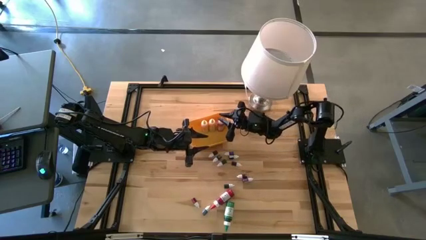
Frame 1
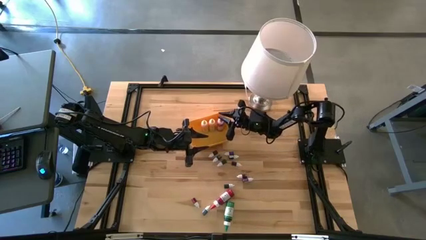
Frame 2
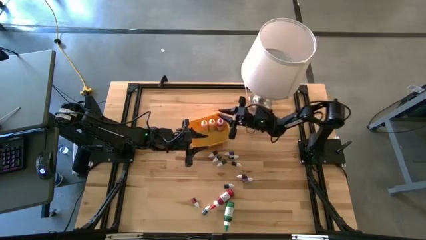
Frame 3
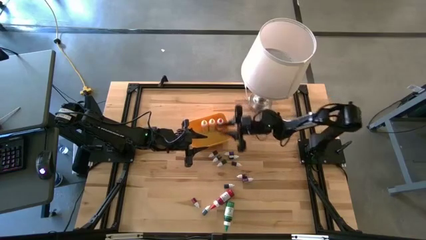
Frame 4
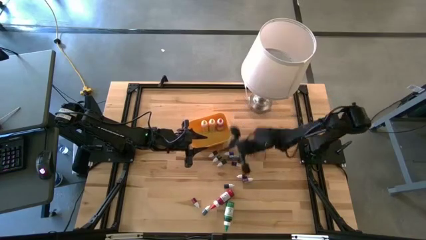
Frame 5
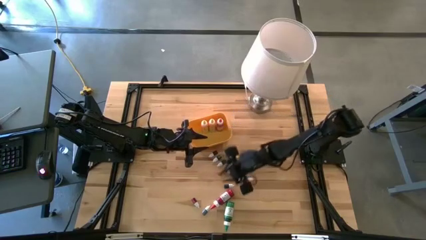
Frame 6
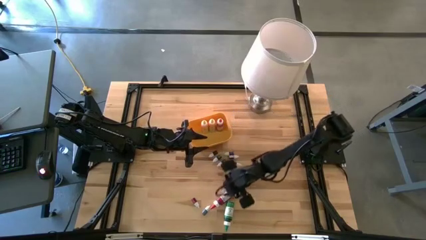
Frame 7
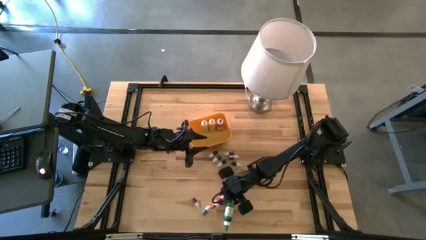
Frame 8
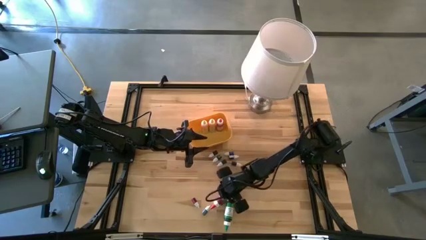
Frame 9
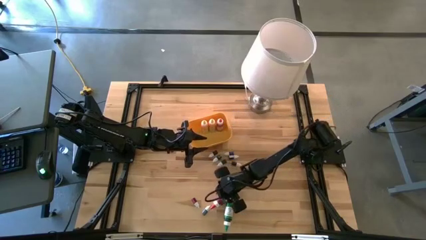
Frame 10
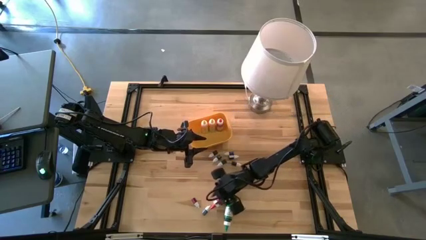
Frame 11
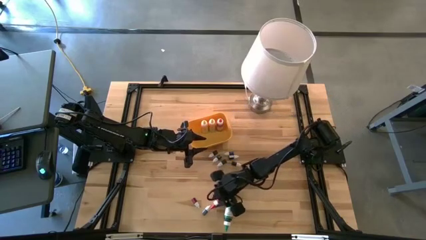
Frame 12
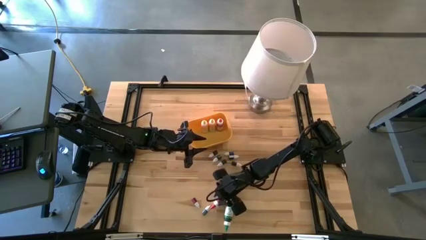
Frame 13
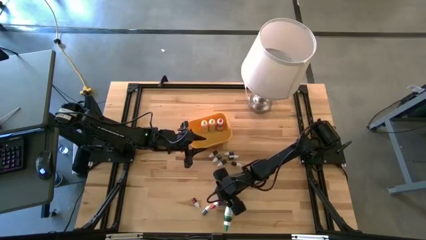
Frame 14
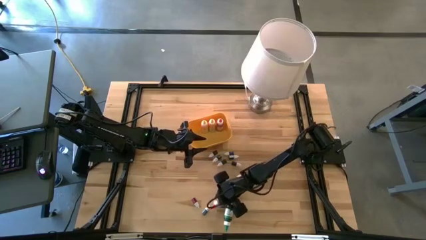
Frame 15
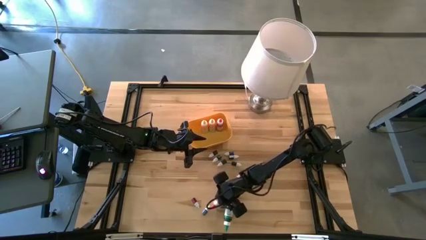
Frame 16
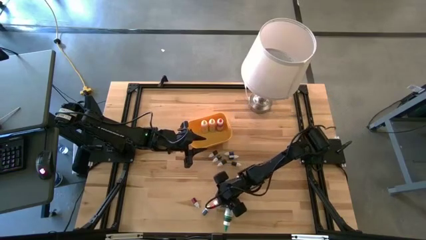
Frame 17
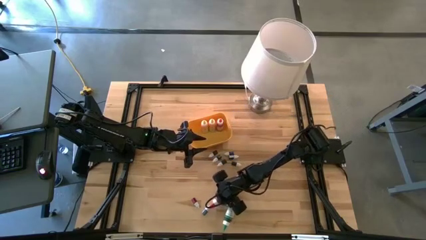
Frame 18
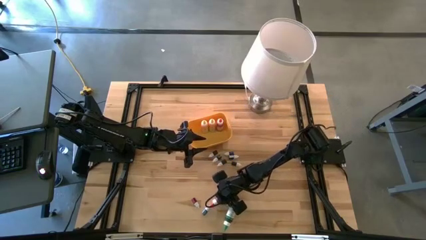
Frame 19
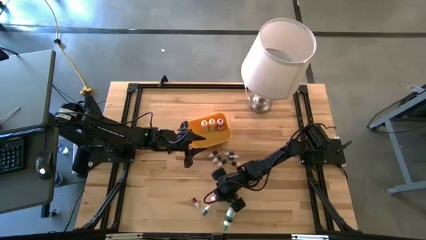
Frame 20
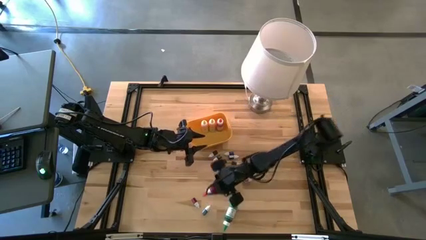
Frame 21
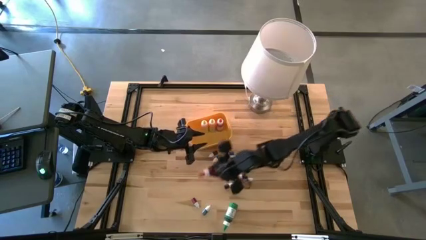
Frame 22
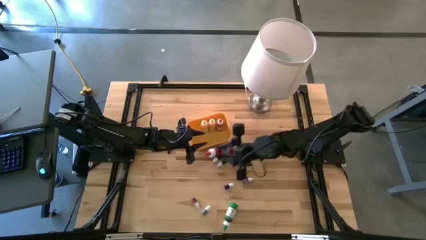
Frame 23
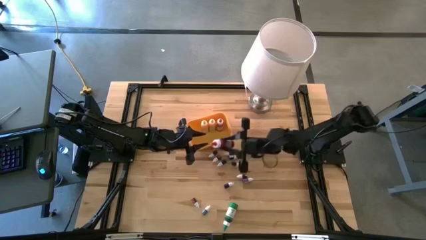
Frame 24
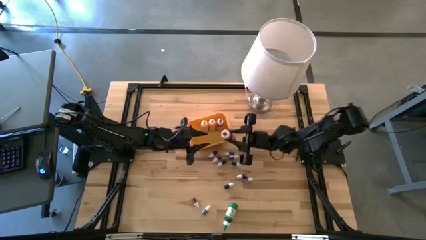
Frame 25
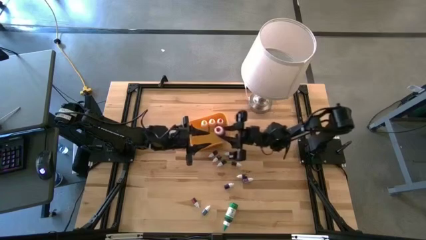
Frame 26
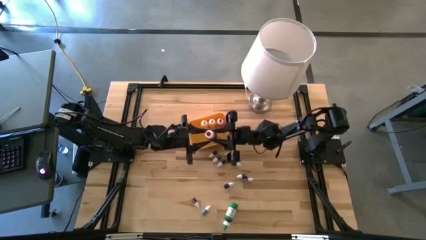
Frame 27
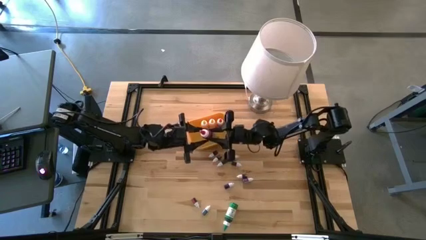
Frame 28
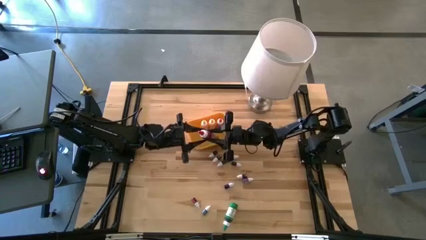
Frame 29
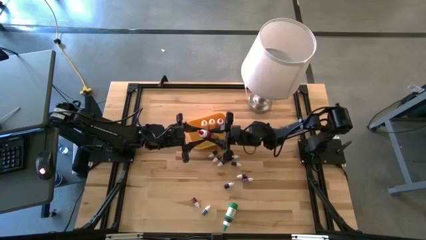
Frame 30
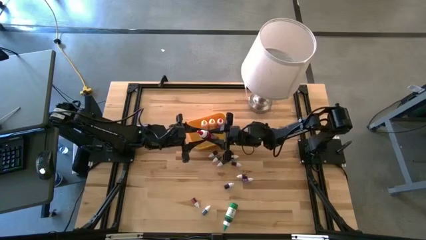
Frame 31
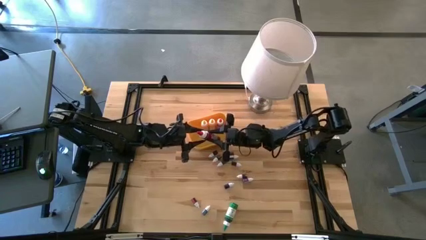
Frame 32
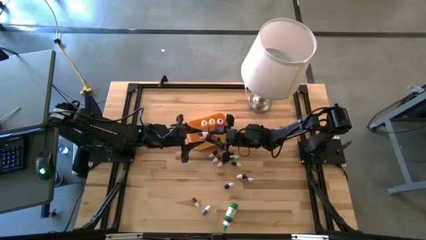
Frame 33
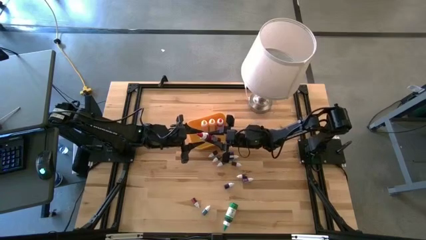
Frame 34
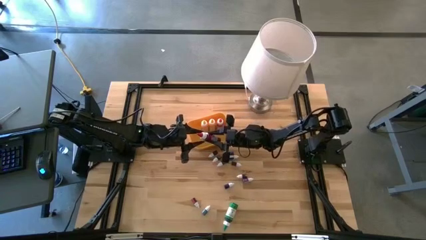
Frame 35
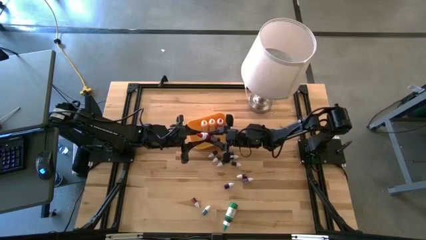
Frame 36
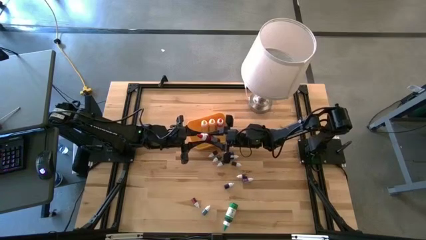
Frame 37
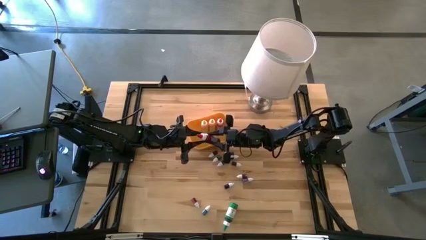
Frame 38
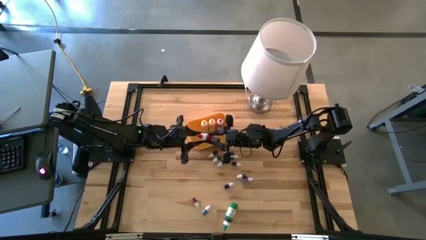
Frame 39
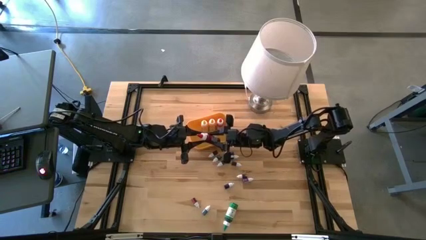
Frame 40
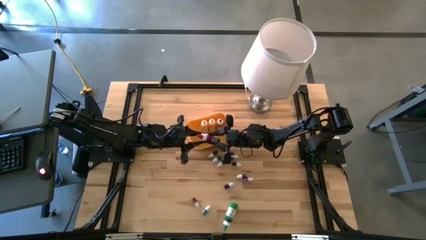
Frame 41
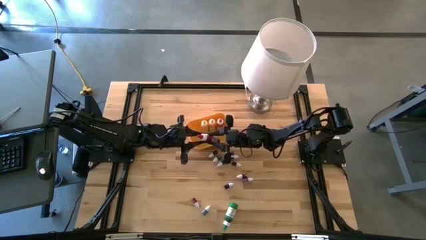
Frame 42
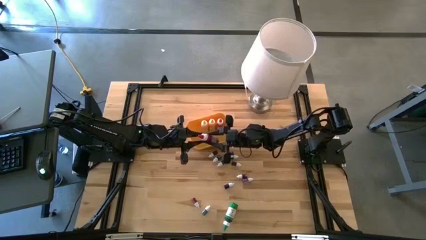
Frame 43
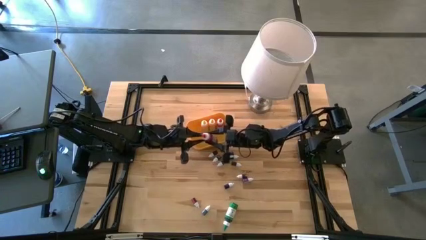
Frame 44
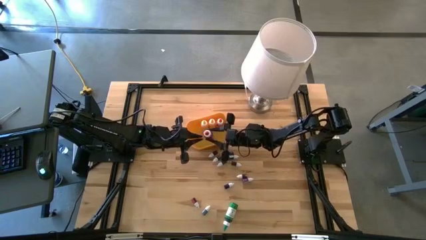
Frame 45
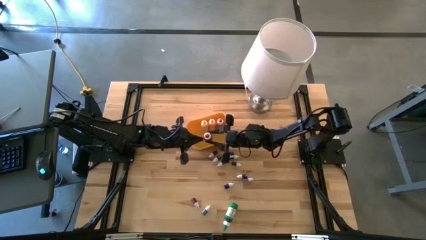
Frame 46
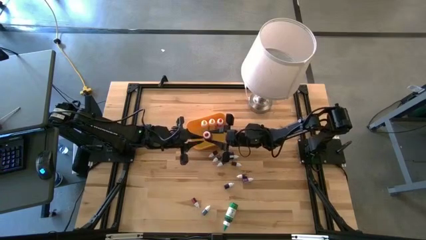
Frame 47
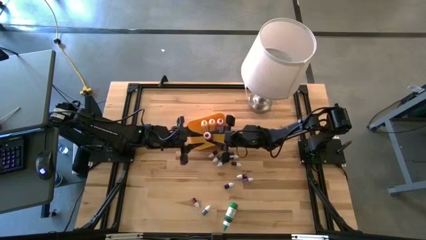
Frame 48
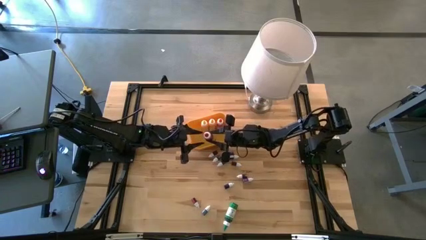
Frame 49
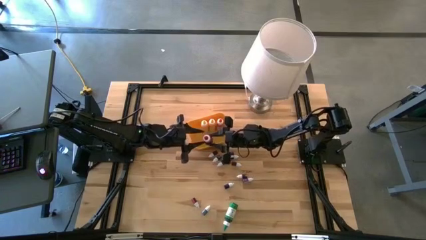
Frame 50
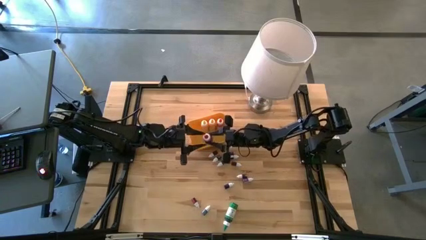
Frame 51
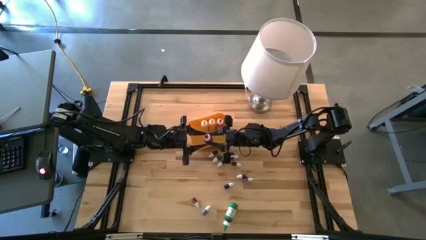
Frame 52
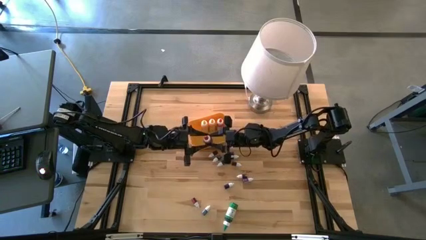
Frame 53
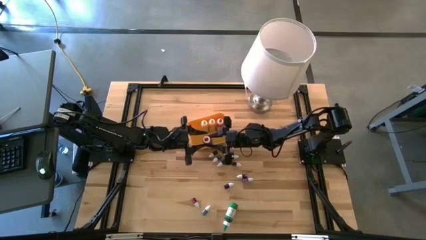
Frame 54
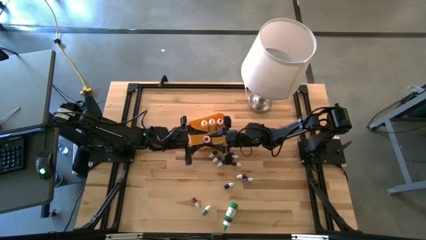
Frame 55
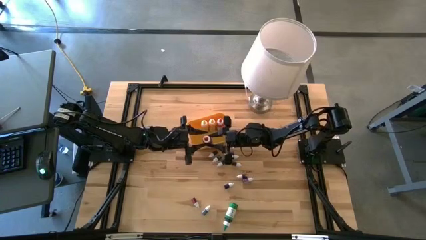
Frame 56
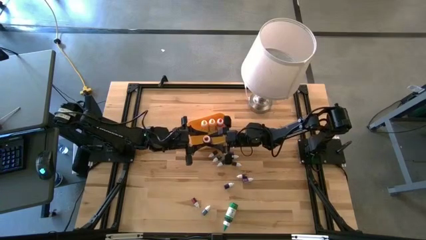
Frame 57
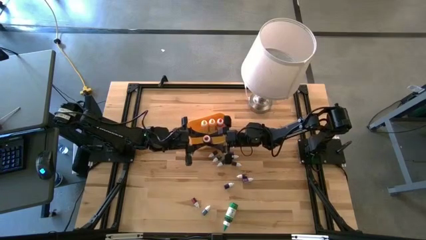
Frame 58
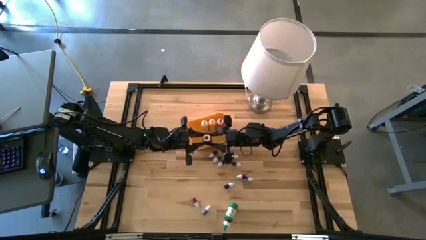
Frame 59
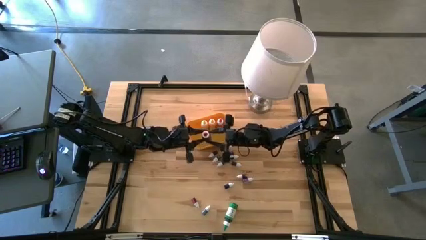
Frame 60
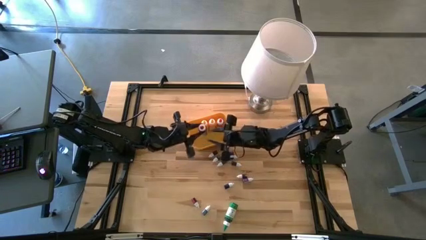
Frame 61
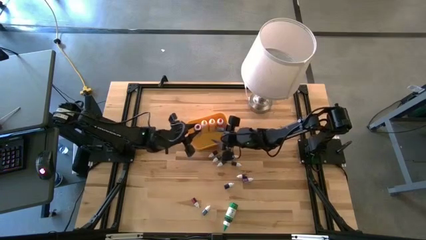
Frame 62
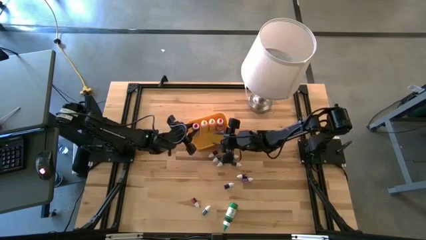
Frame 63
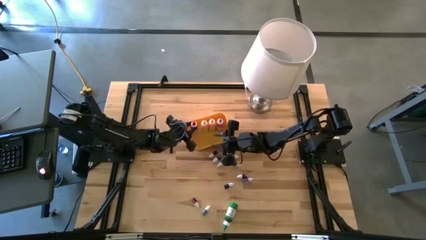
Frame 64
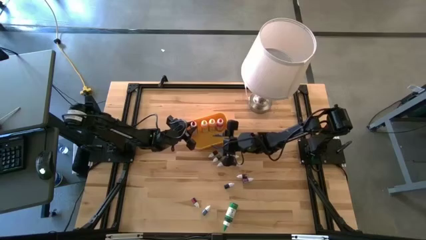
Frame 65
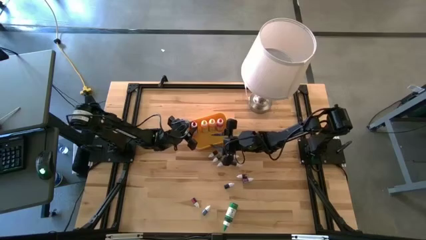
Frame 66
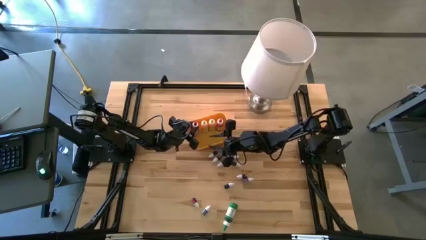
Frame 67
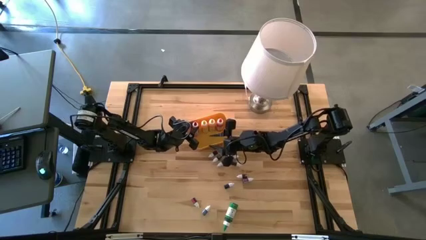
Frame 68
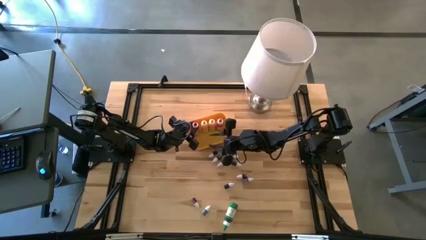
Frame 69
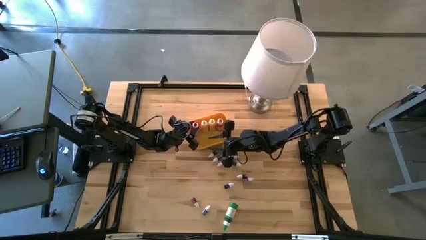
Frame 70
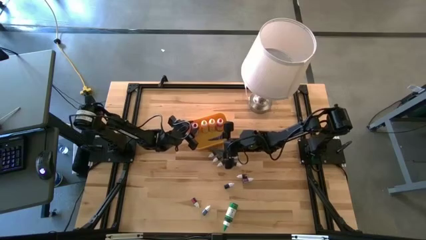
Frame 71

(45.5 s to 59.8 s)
Task: Pick & Place food coloring
Put the large red food coloring bottle into the yellow bin
